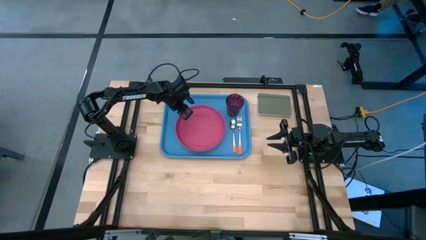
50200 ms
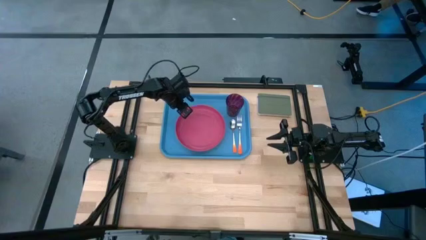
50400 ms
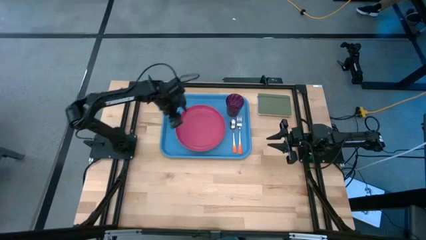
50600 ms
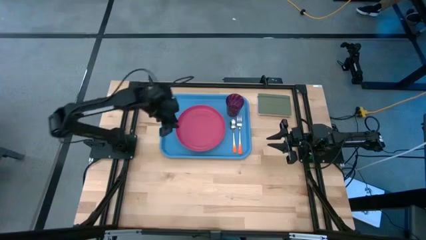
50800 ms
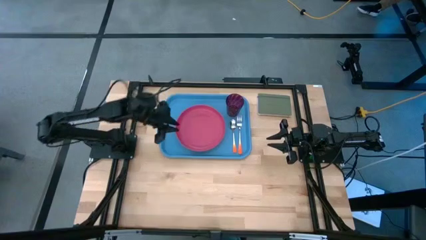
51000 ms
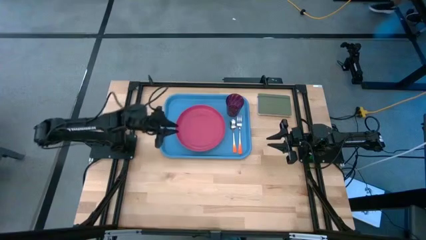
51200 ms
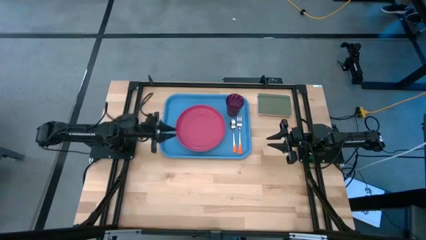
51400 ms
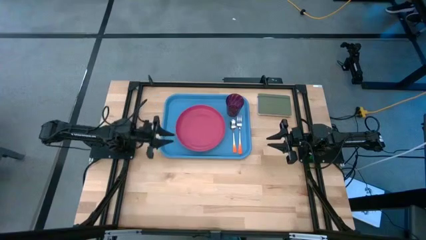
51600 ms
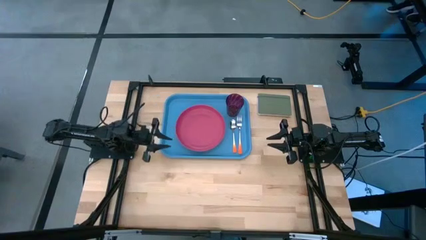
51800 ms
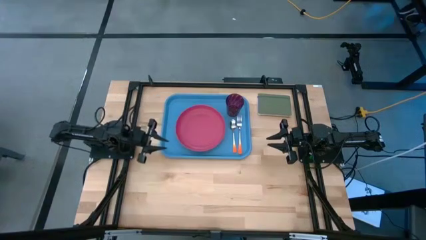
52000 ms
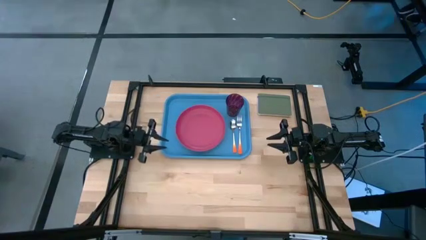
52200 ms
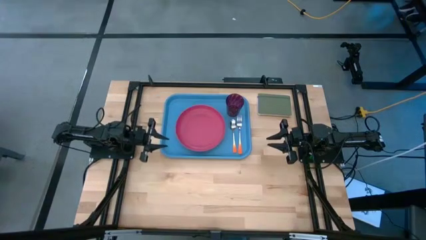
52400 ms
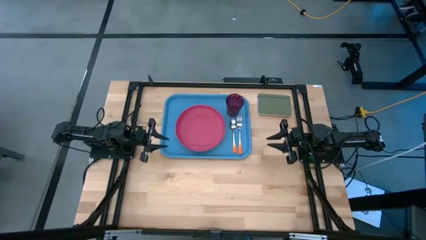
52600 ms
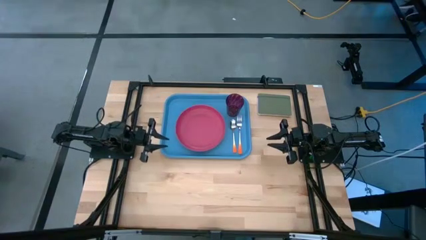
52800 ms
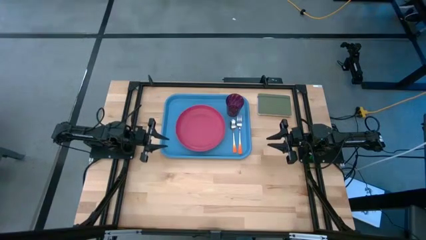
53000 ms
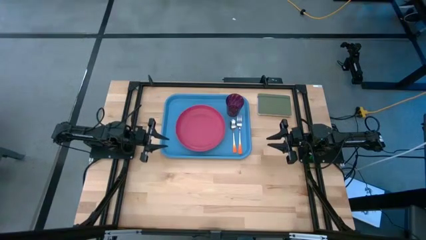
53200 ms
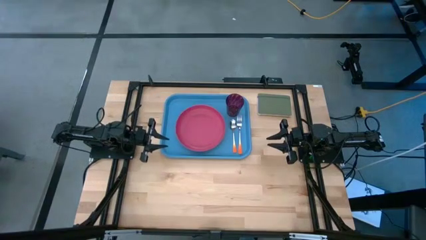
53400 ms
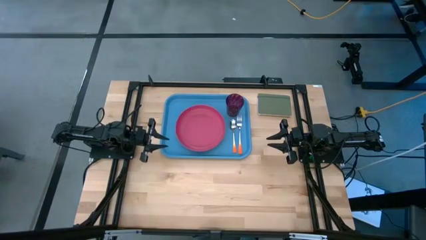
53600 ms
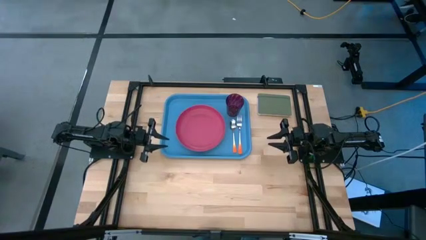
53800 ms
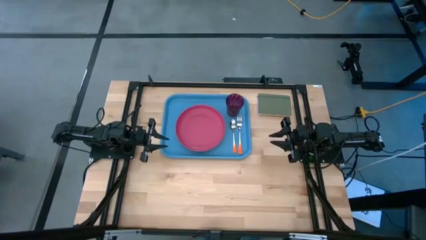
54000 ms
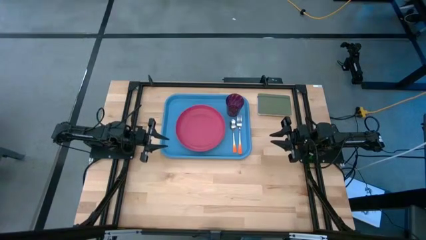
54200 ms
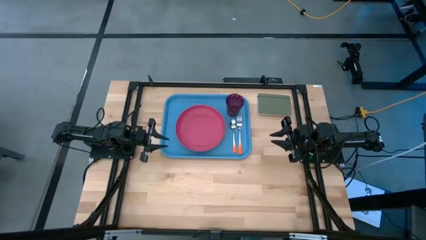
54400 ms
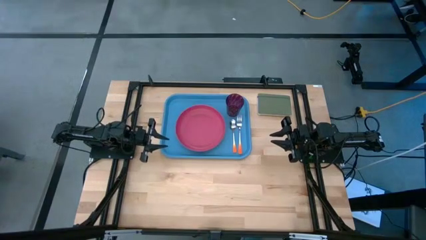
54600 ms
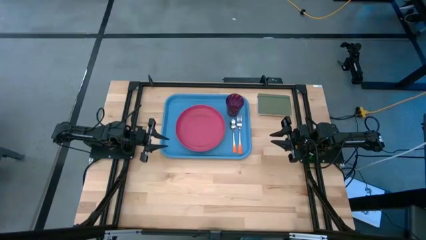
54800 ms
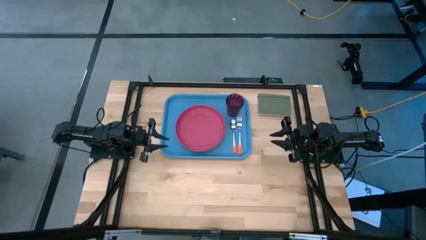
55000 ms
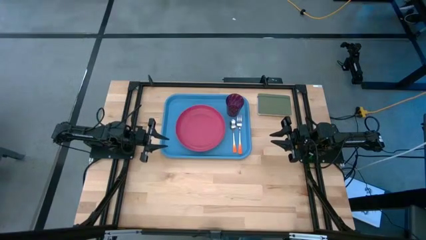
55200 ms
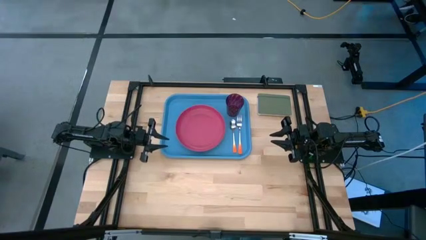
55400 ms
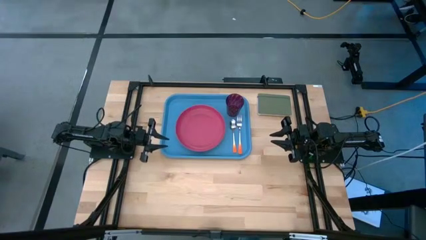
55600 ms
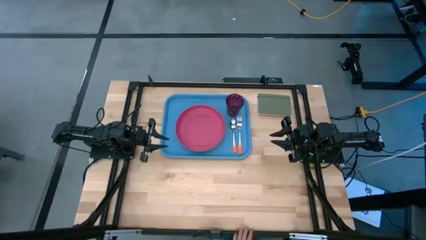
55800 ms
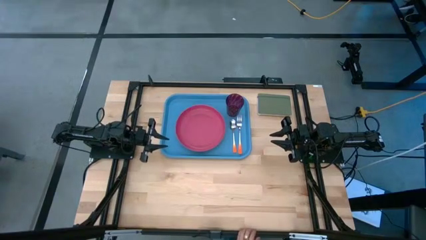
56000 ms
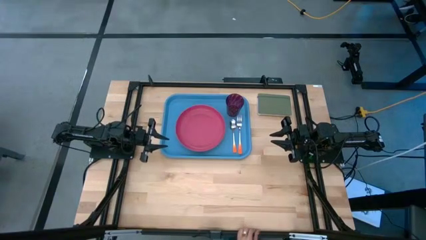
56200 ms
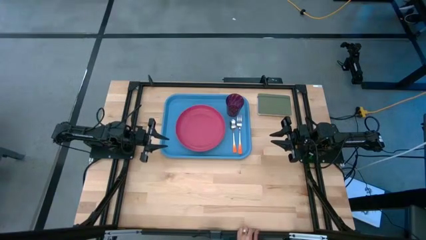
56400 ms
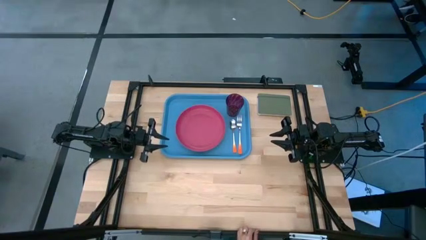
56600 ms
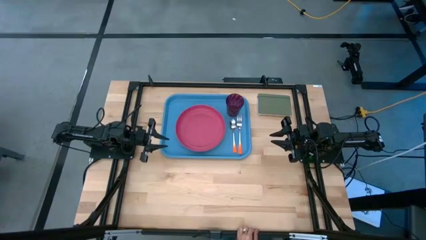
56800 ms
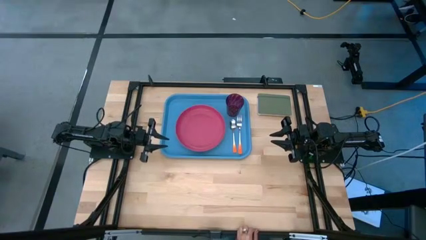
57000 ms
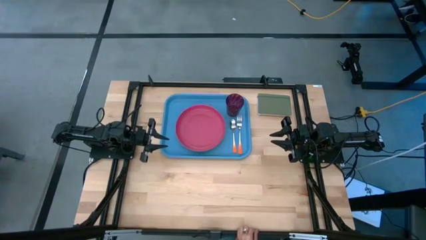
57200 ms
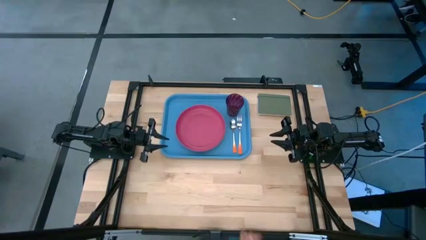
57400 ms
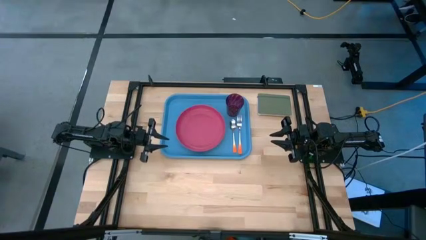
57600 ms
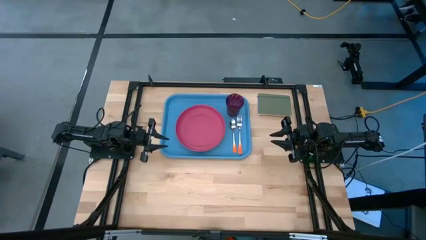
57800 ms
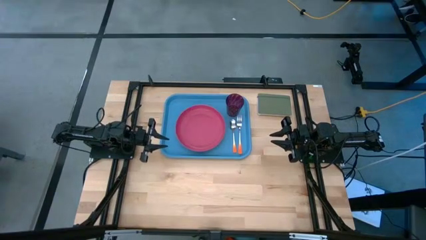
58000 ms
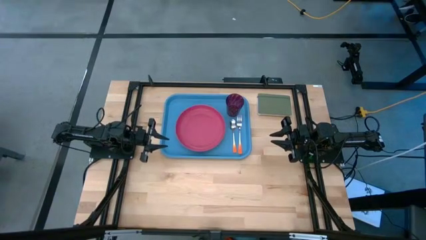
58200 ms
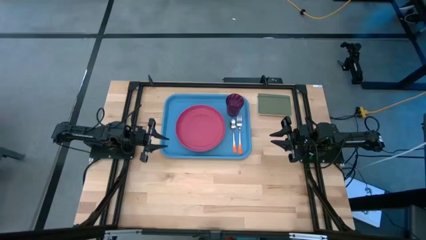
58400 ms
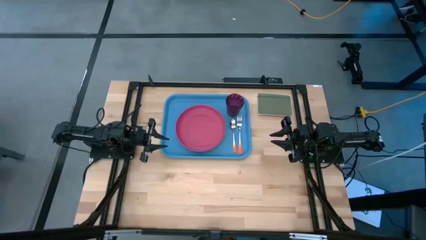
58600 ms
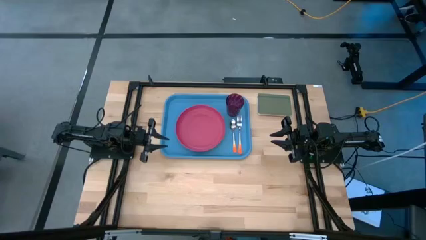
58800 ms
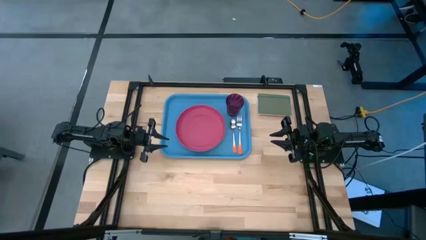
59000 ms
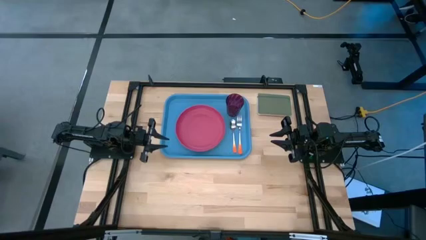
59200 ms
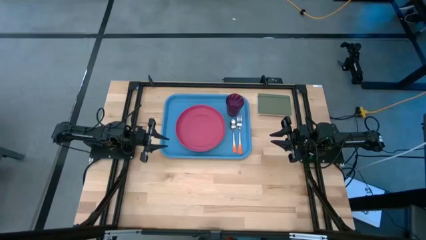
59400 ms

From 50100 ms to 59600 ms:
Task: Pick and place plate/cup/fork/spoon on tray
Return to Home Position

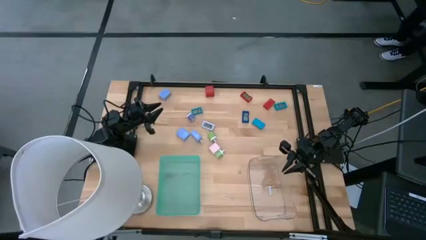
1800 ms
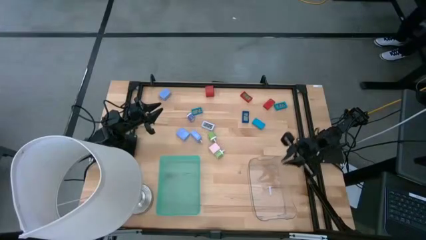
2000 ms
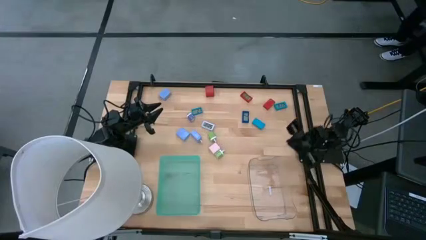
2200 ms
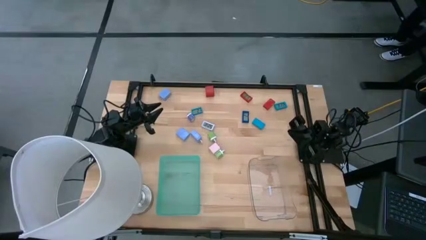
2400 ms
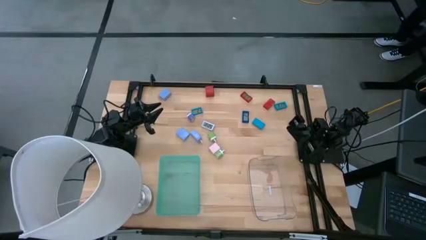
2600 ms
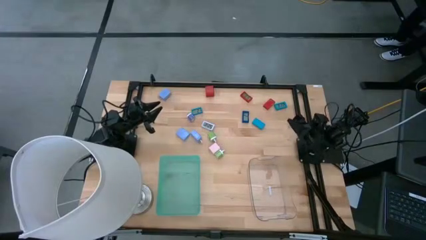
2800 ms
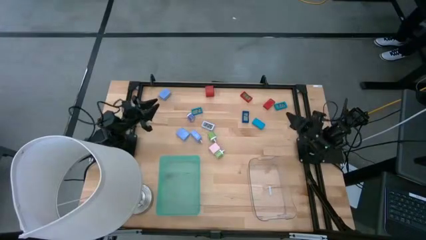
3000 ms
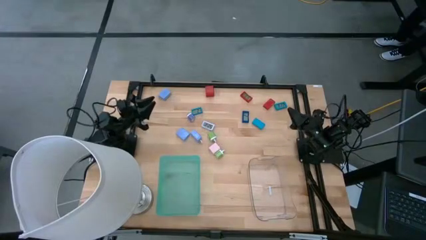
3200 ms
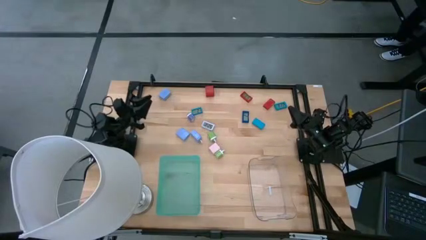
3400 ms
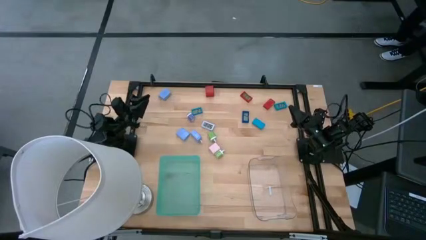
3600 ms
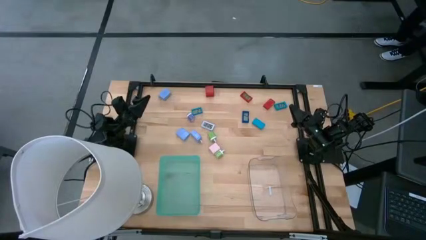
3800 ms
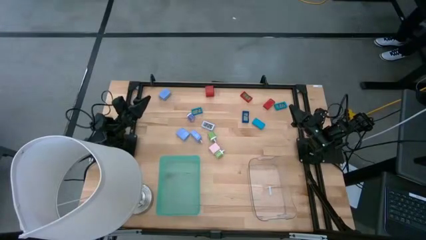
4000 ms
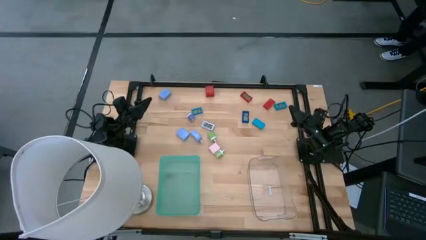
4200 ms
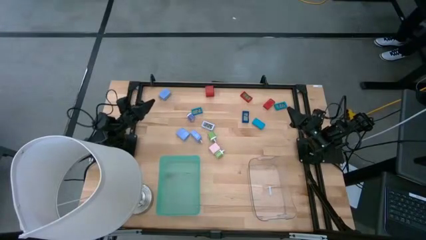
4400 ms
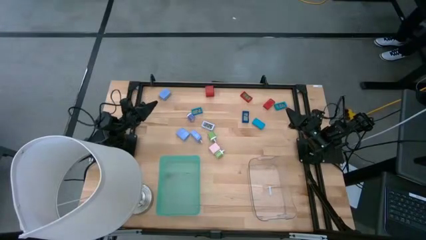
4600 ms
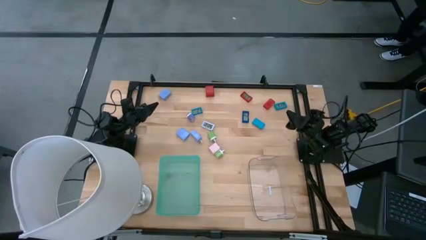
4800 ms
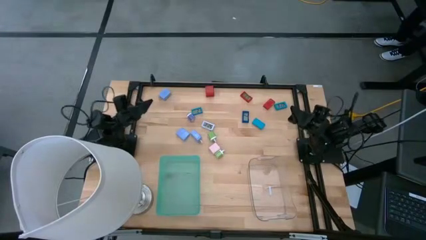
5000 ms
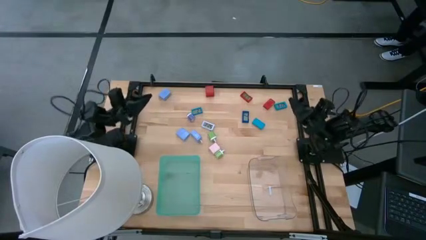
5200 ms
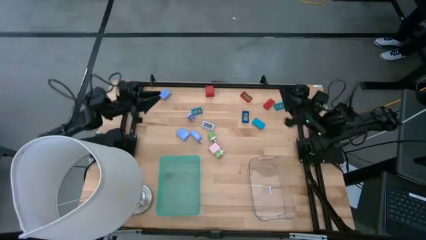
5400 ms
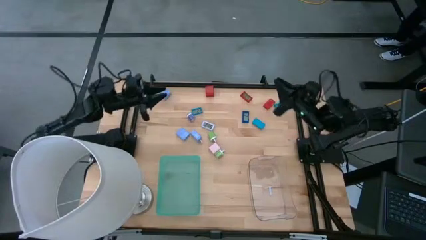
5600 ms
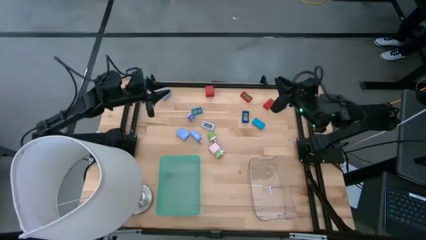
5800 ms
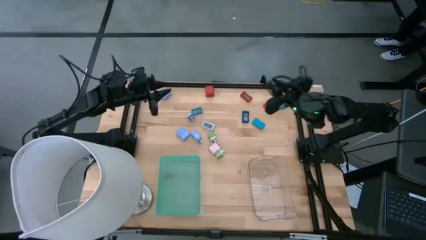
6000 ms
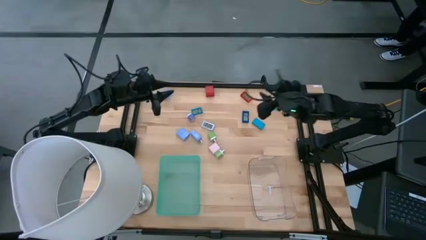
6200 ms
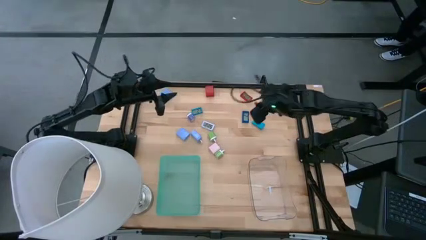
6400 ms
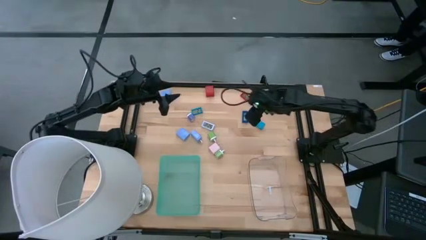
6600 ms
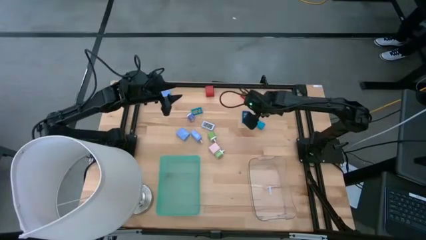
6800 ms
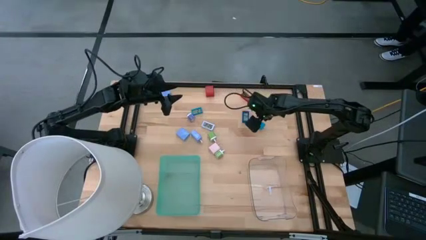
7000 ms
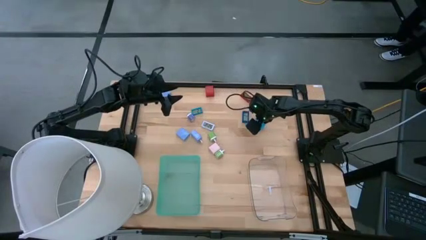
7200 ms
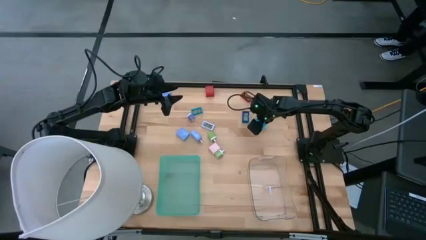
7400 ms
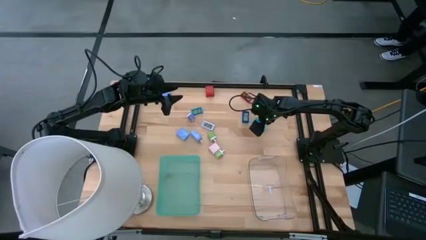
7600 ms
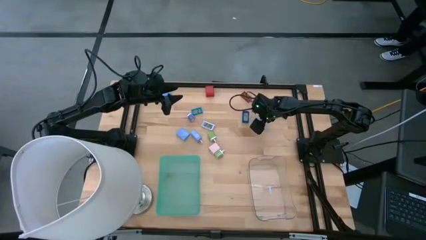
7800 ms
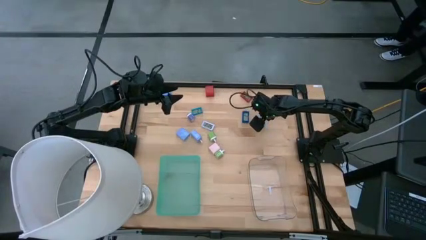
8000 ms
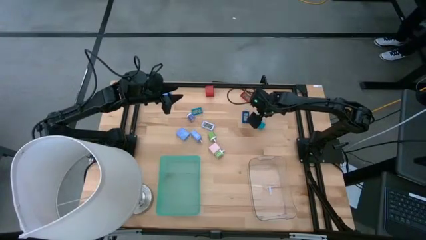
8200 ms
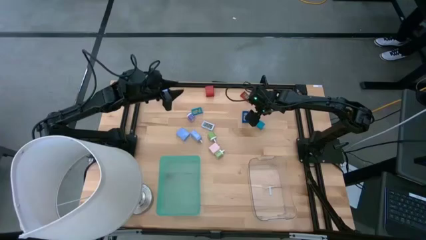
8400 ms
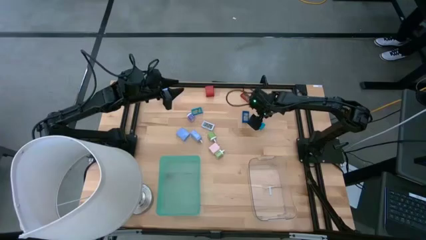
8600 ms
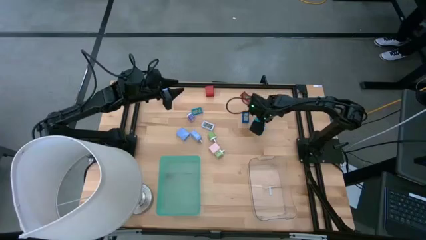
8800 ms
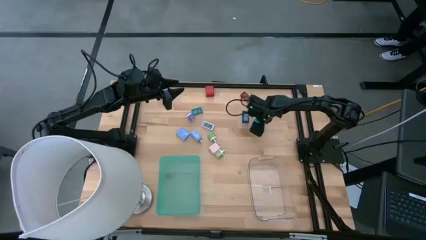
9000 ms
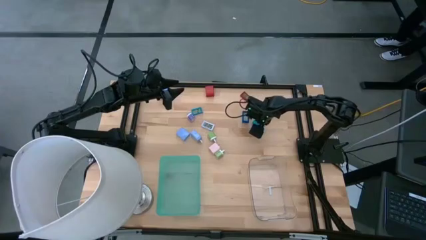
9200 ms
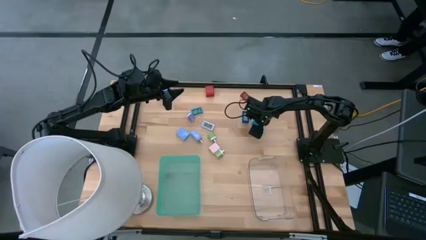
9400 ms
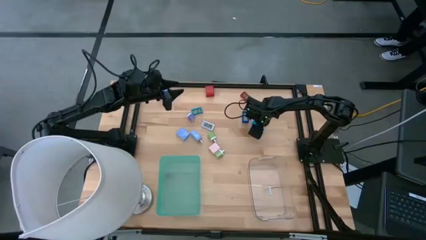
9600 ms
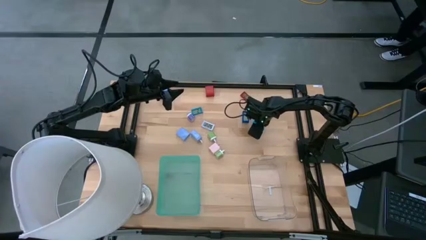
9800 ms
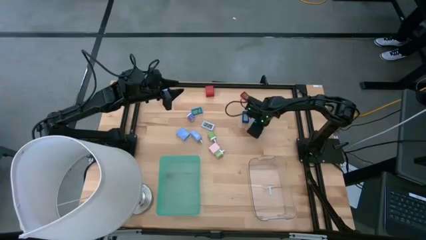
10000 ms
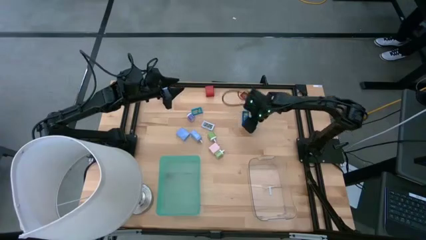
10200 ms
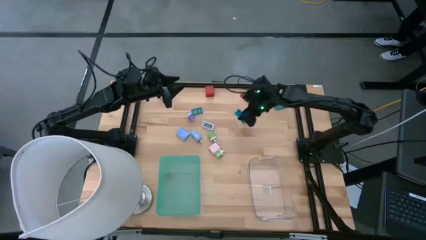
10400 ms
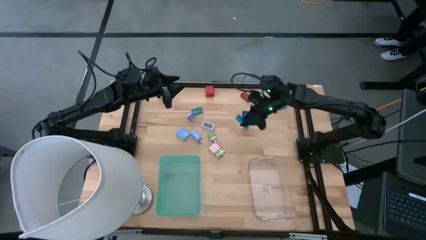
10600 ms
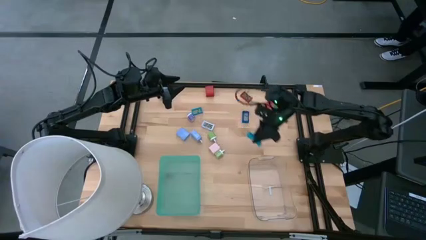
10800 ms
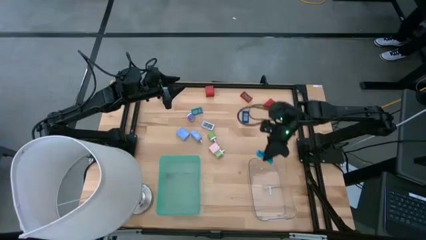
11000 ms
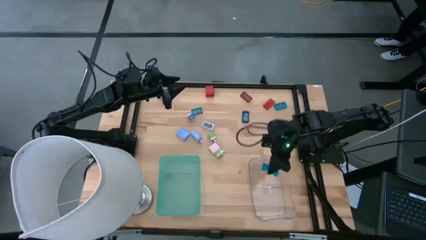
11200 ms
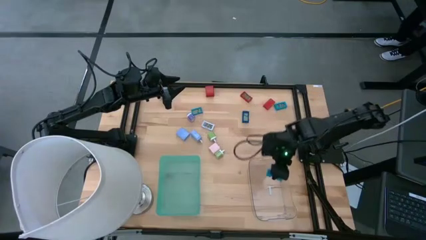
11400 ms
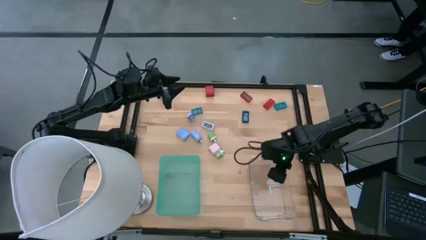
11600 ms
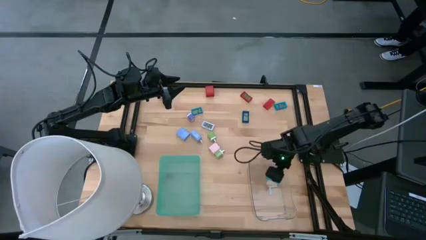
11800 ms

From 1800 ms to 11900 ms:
Task: Pick & Place Office items
Put the middle light blue digital clock into the transparent bin
